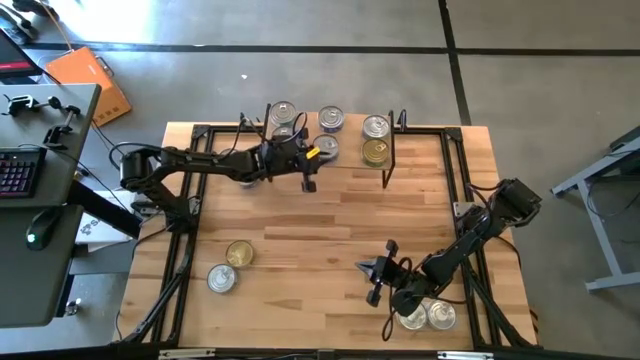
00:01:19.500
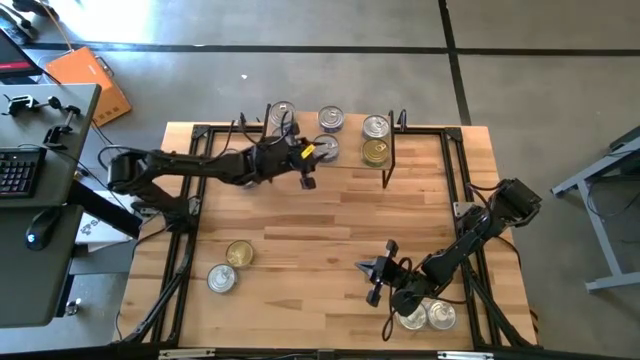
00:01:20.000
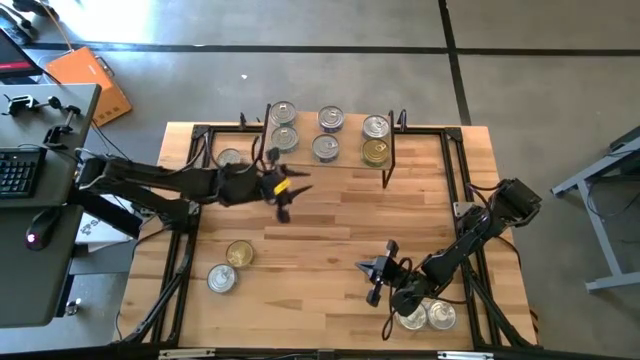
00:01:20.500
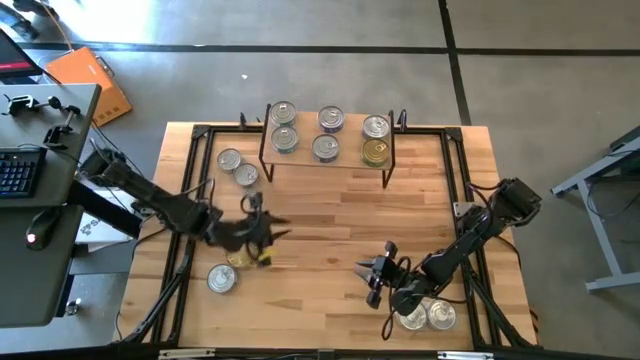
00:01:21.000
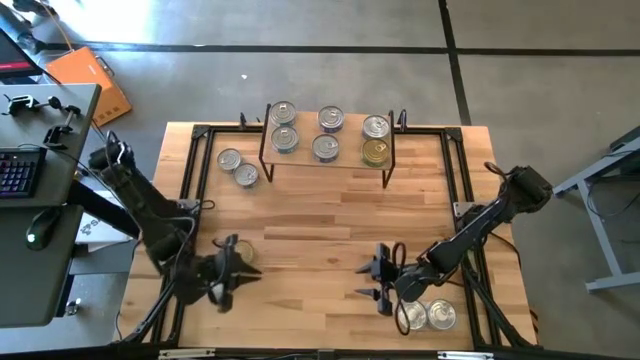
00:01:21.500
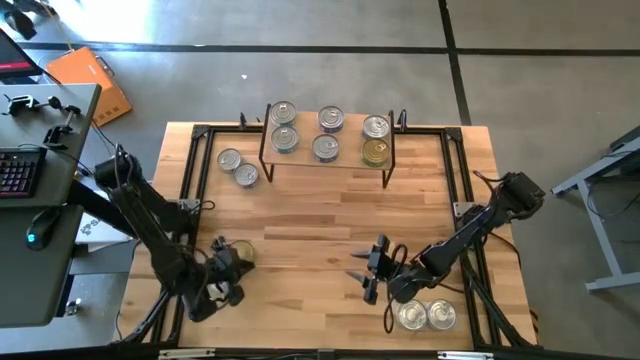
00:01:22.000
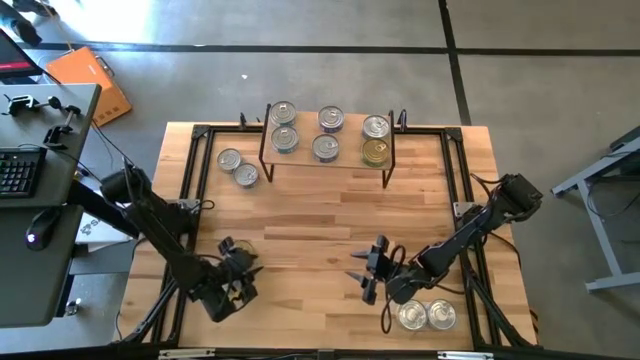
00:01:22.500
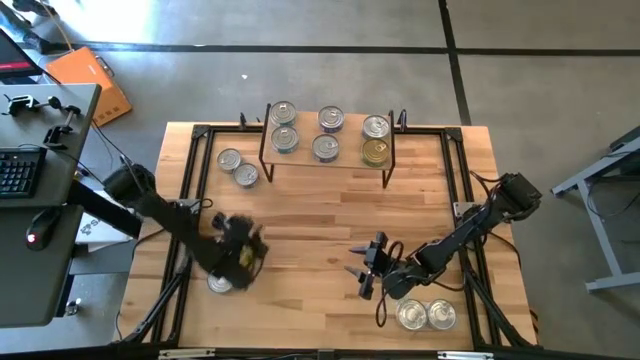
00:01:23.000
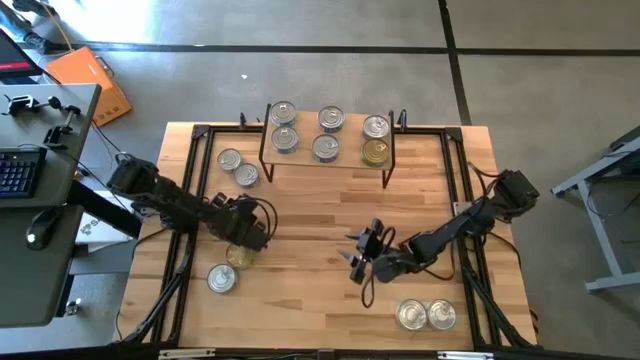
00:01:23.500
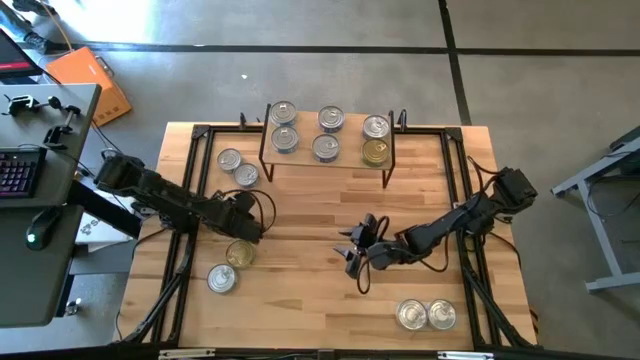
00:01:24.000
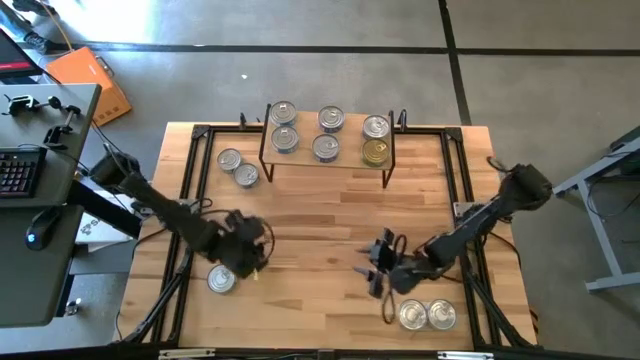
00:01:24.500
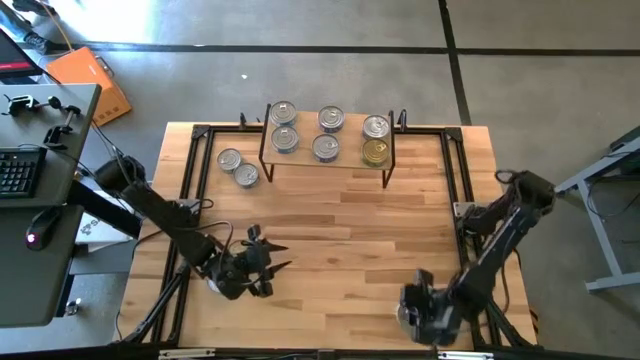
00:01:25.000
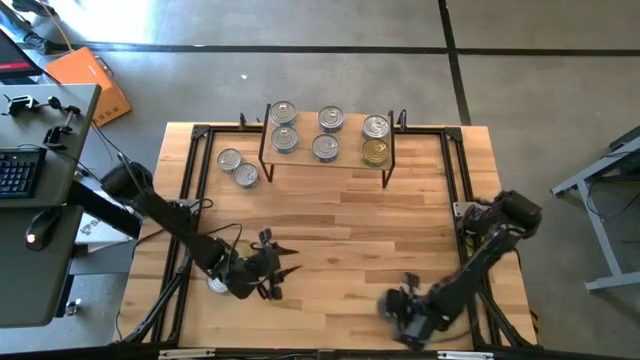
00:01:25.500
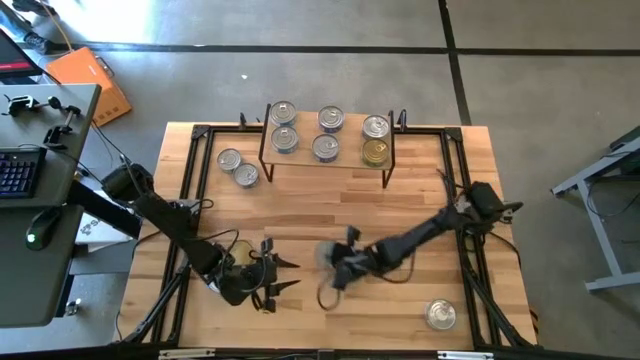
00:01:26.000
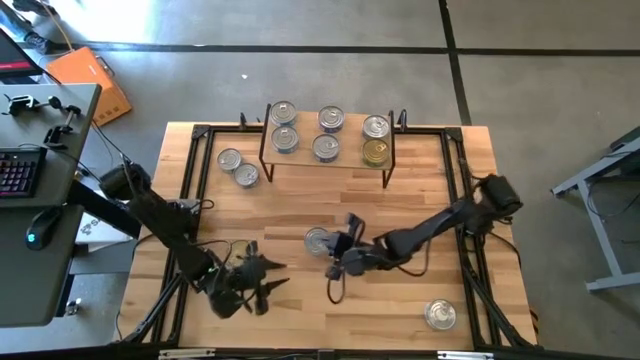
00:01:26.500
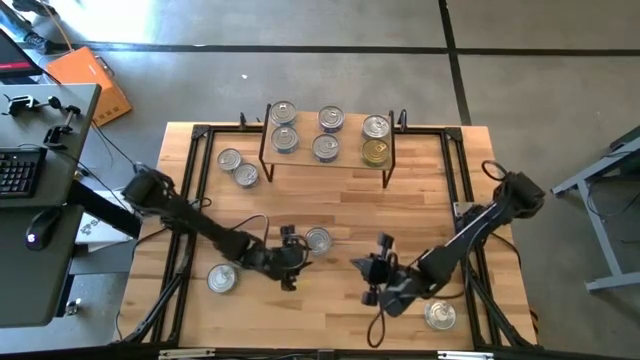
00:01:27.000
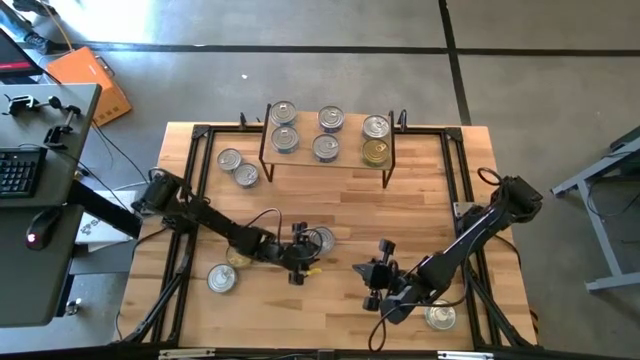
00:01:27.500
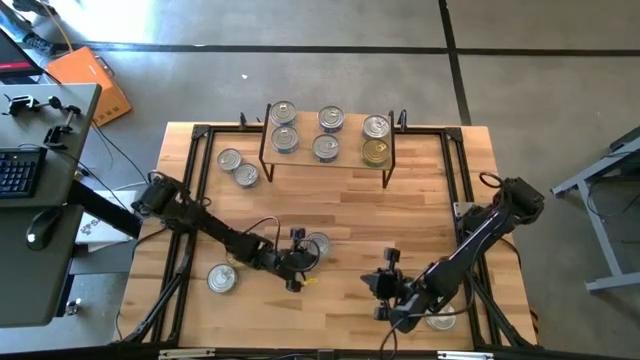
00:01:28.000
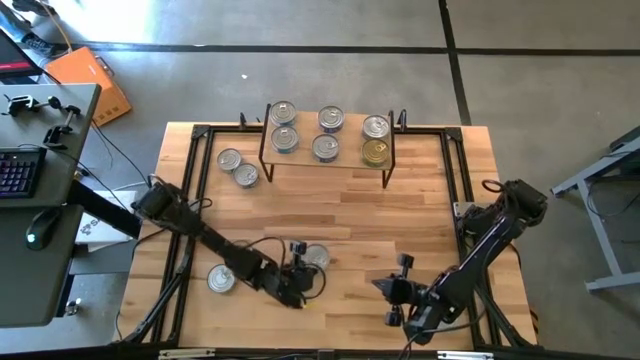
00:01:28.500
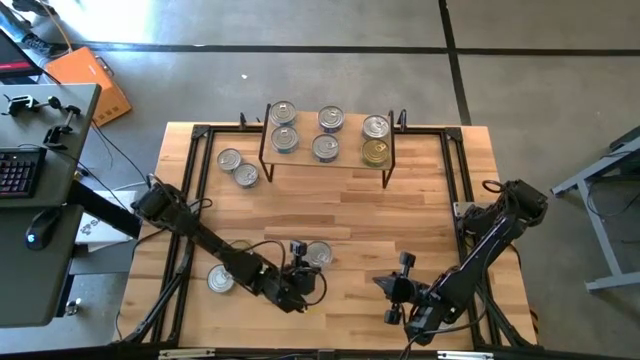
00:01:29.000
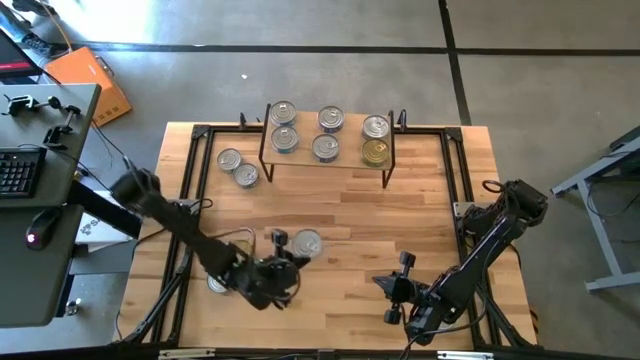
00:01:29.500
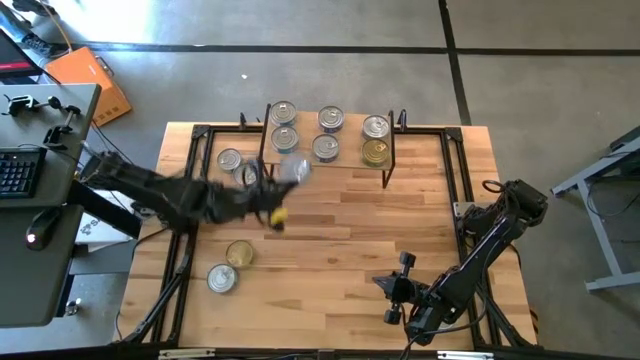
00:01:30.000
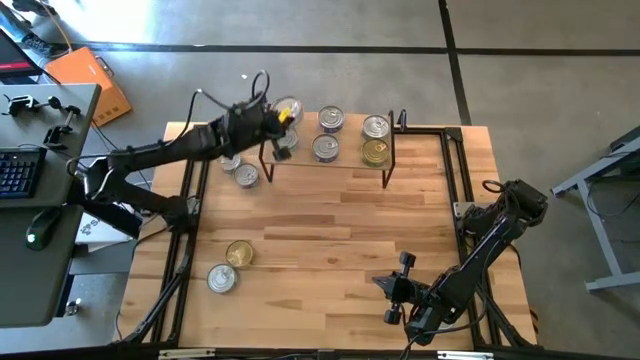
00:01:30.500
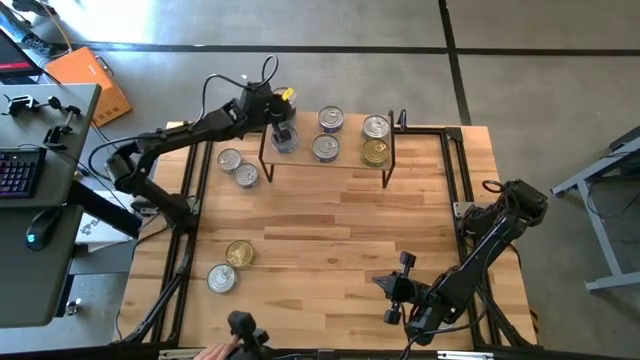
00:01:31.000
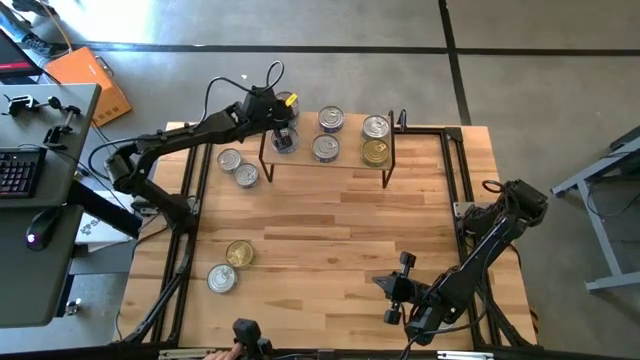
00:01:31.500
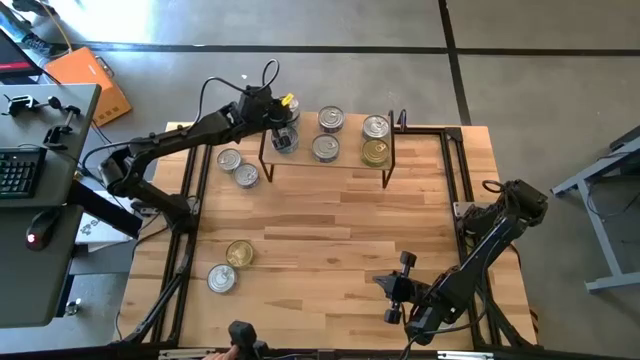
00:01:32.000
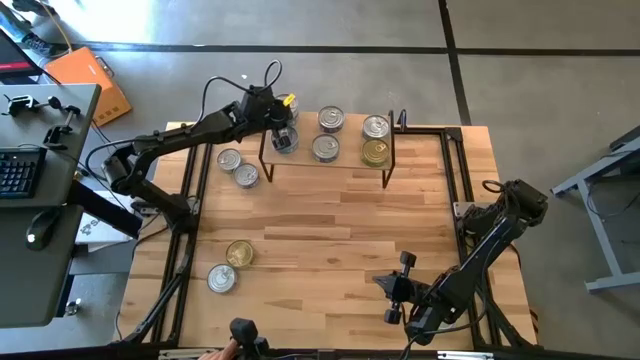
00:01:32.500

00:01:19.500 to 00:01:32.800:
Task: Stack canned seafood by type on shelf
Stack the yellow blue tuna can on top of the yellow blue tuna can on the shelf

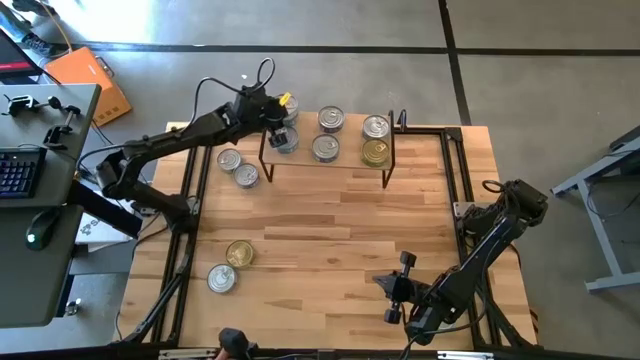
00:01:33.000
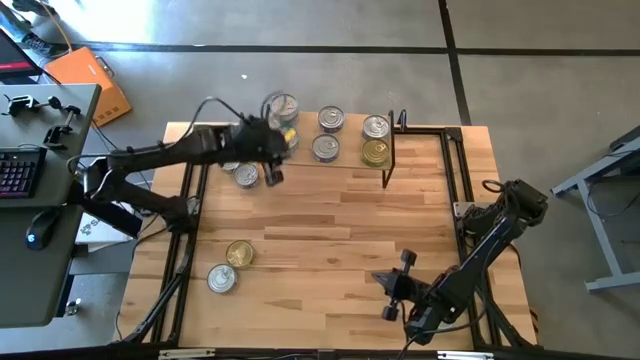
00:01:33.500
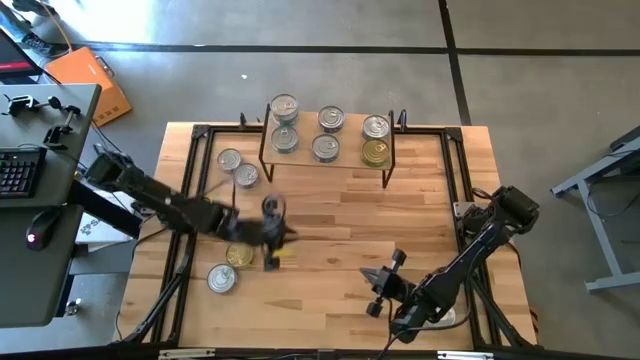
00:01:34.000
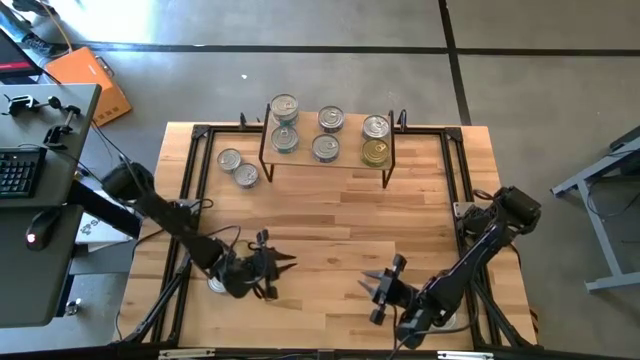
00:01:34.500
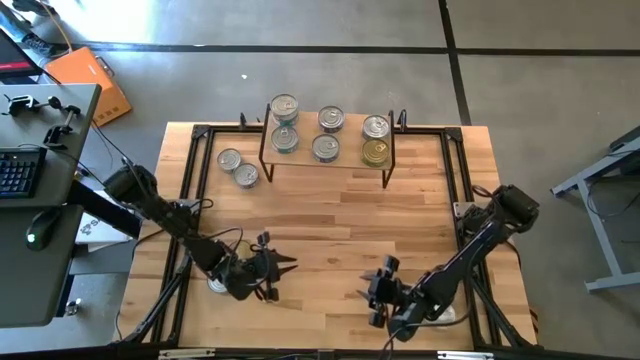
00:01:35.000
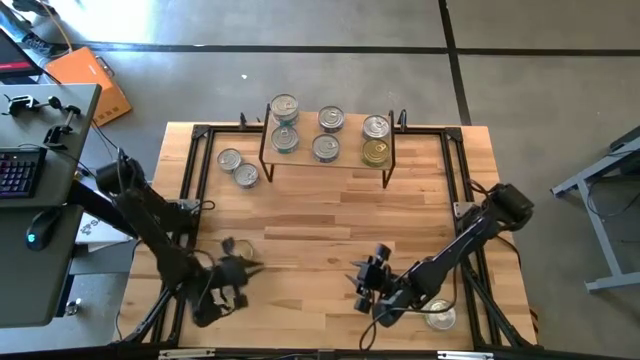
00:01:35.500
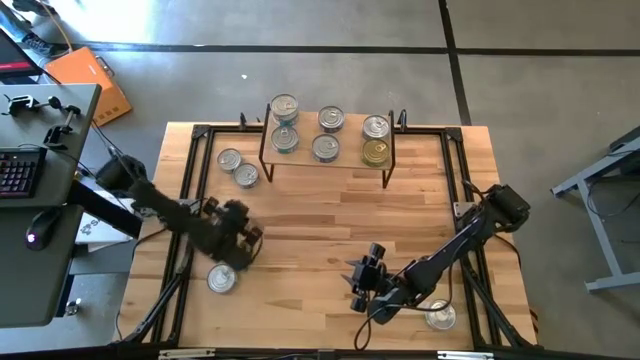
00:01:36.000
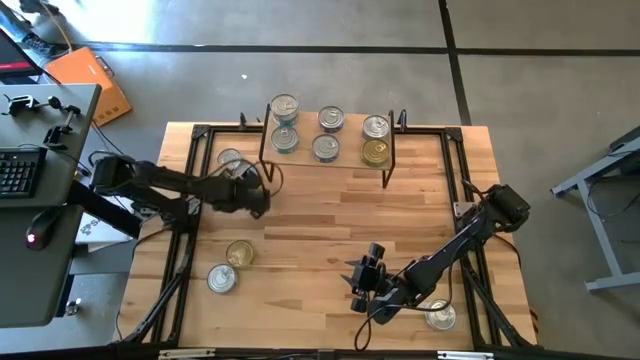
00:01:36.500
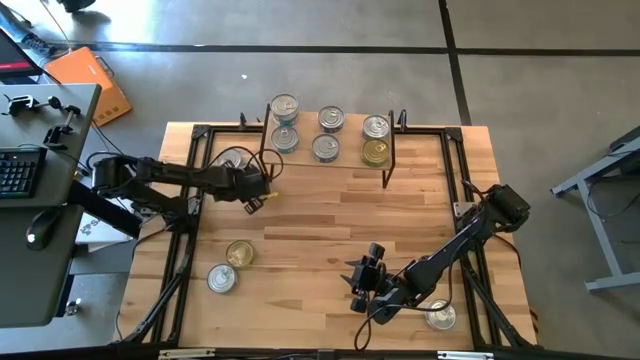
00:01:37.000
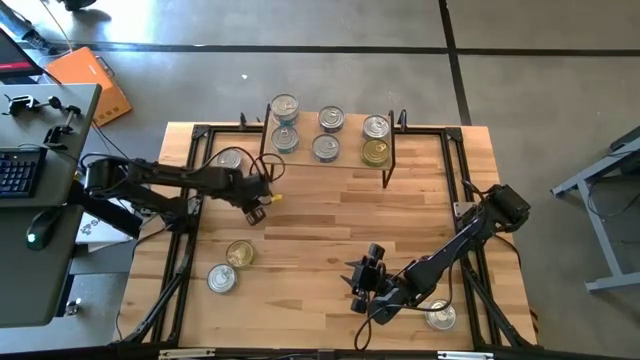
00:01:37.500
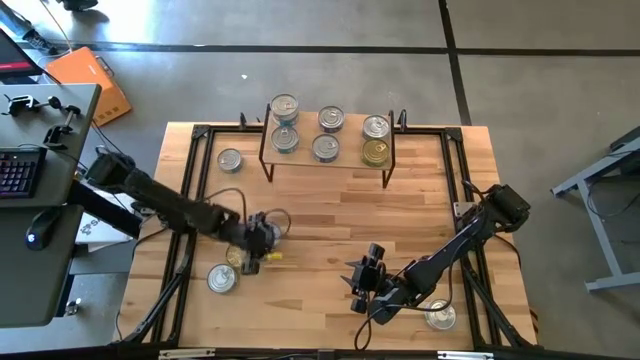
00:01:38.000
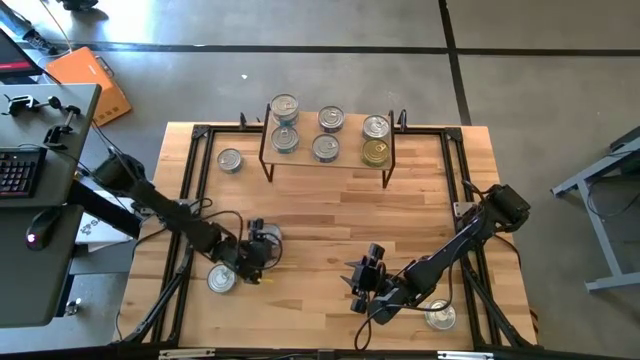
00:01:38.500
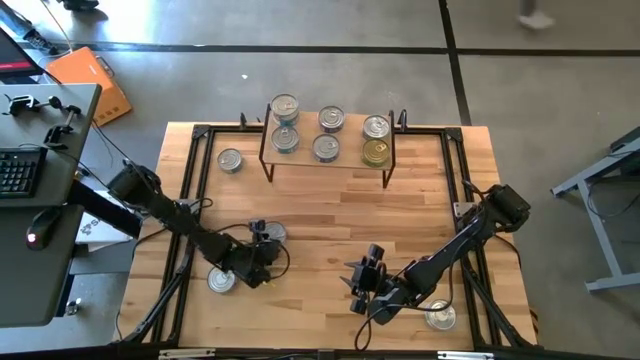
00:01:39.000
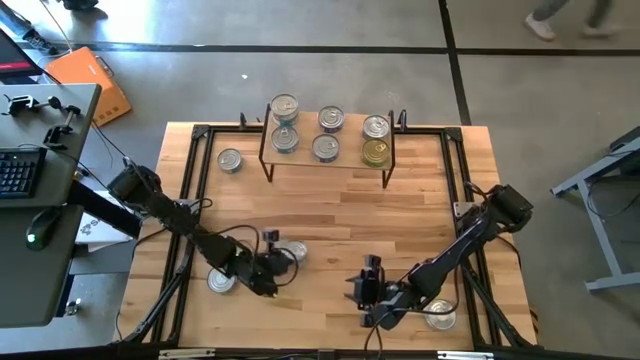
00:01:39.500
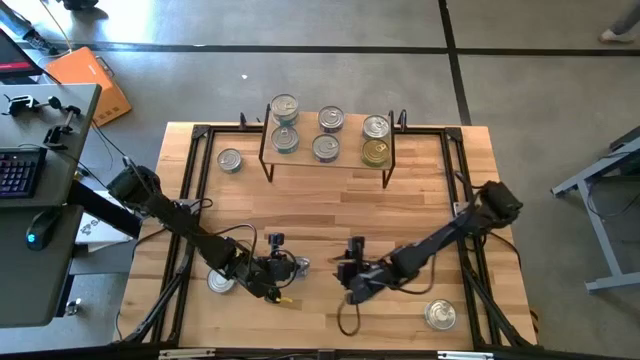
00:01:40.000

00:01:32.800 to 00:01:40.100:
Stack the blue tuna can on top of the blue tuna can on the shelf
